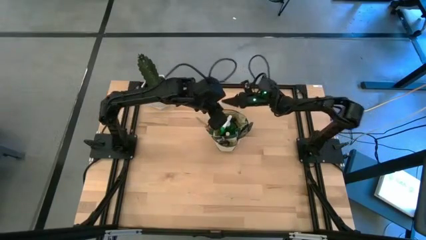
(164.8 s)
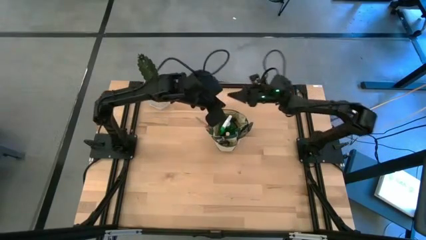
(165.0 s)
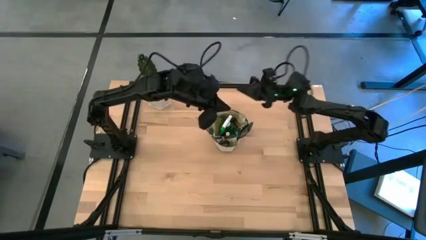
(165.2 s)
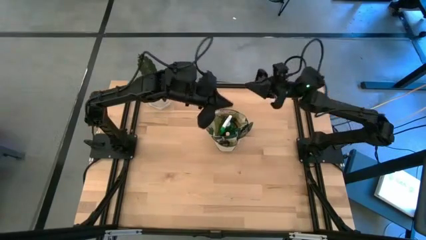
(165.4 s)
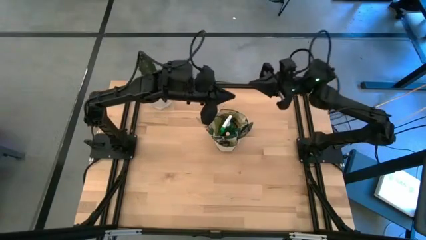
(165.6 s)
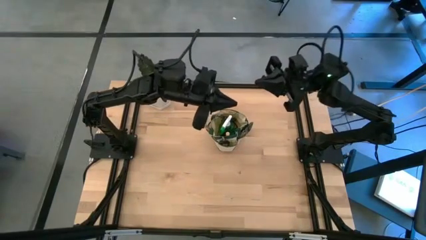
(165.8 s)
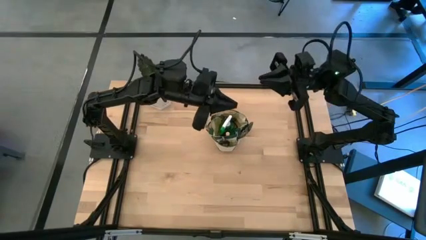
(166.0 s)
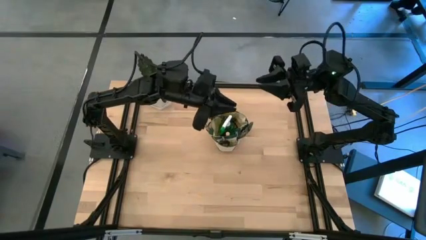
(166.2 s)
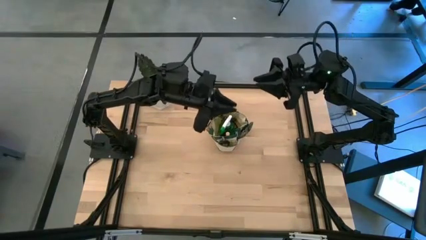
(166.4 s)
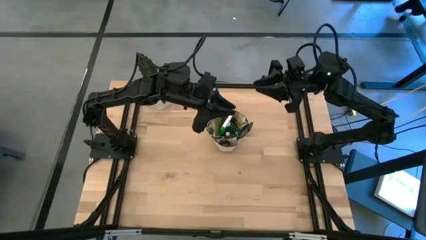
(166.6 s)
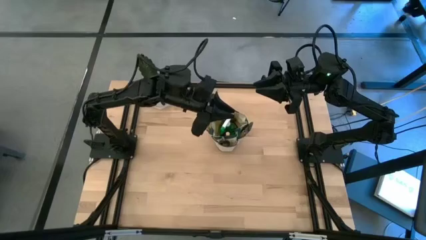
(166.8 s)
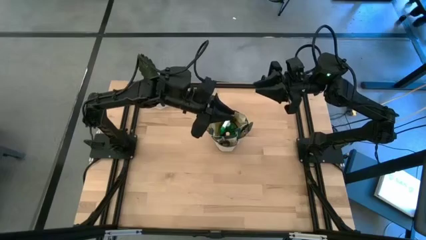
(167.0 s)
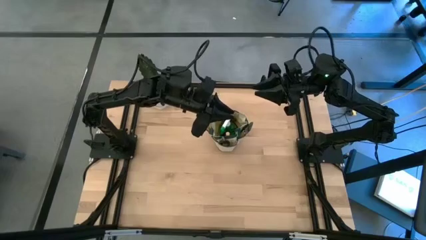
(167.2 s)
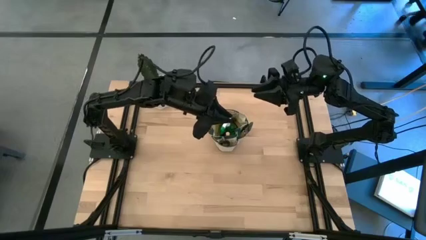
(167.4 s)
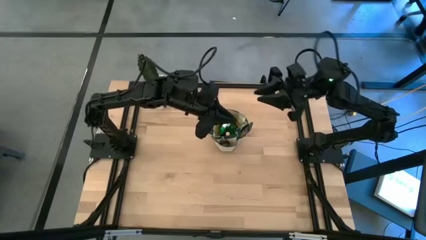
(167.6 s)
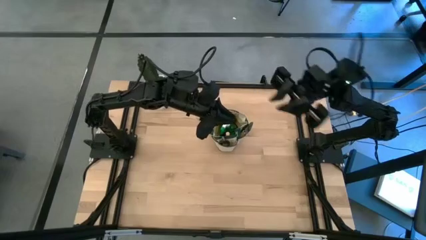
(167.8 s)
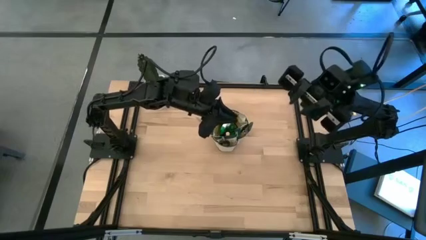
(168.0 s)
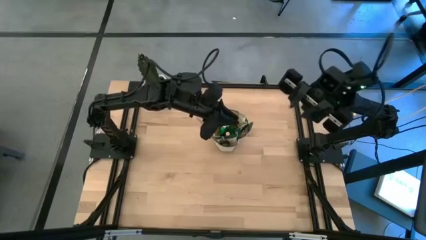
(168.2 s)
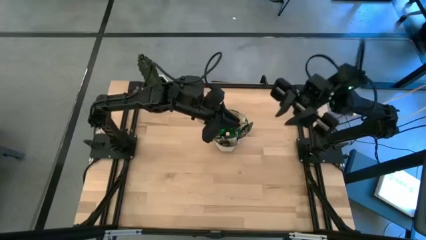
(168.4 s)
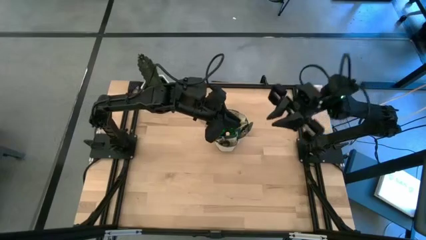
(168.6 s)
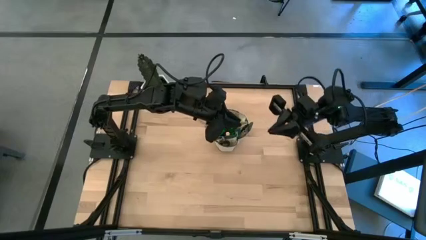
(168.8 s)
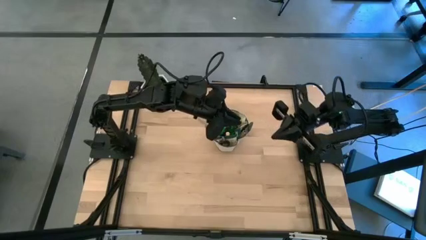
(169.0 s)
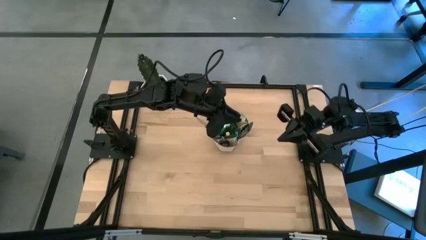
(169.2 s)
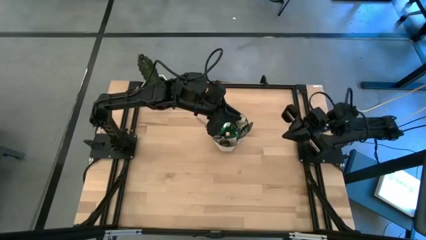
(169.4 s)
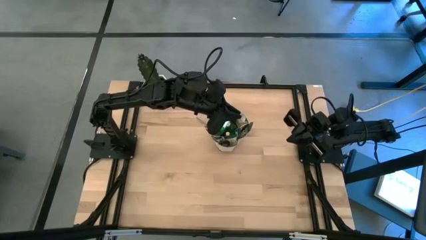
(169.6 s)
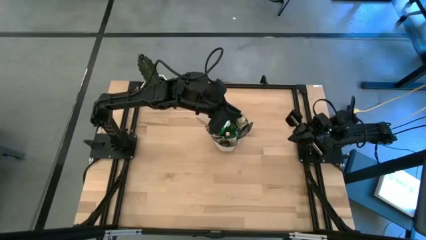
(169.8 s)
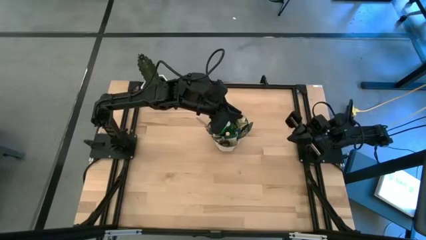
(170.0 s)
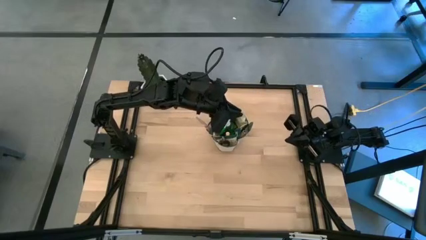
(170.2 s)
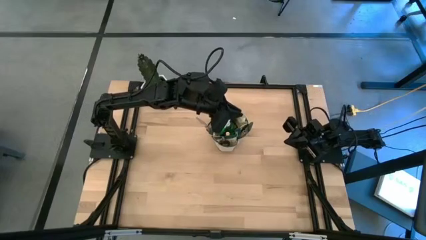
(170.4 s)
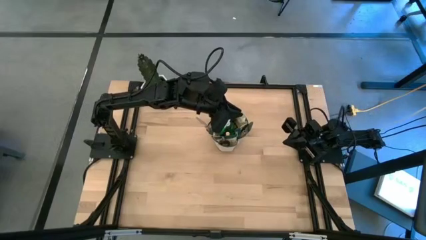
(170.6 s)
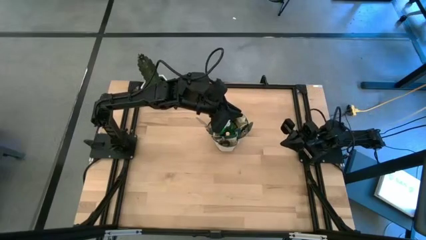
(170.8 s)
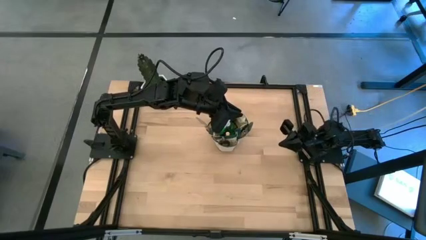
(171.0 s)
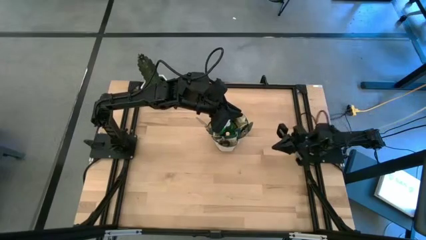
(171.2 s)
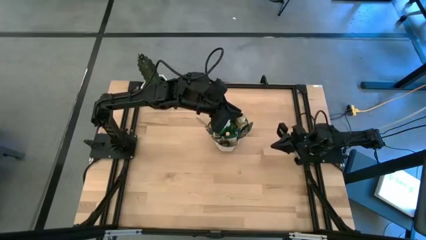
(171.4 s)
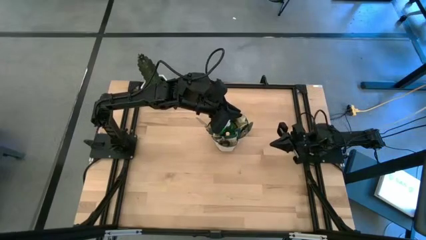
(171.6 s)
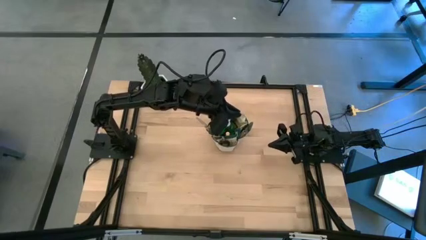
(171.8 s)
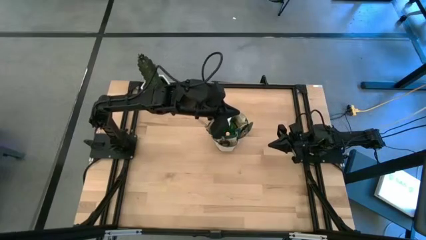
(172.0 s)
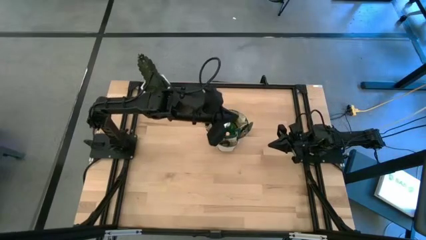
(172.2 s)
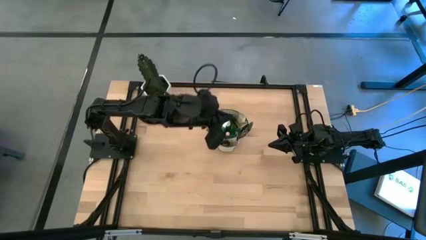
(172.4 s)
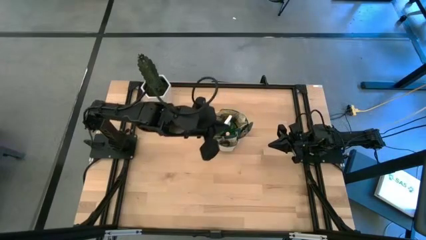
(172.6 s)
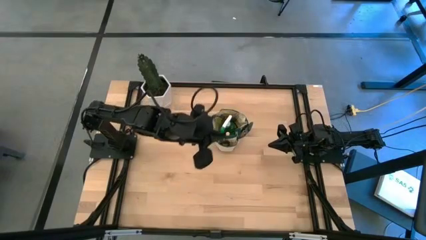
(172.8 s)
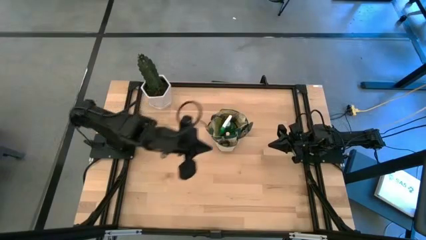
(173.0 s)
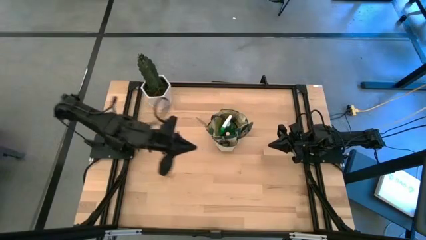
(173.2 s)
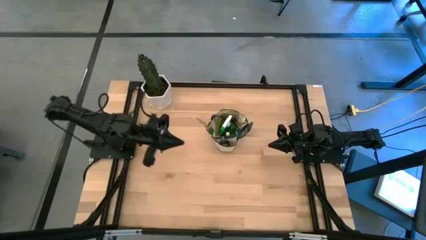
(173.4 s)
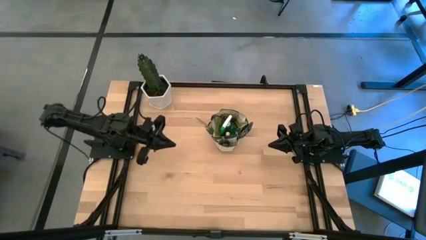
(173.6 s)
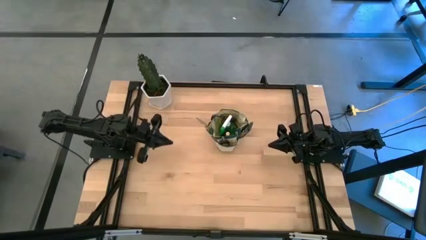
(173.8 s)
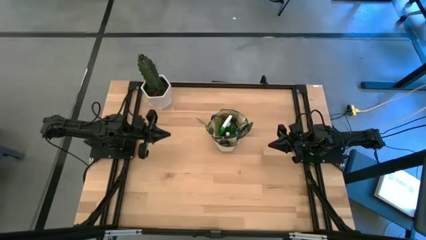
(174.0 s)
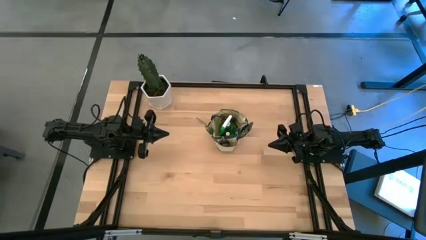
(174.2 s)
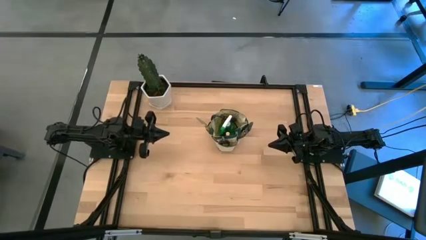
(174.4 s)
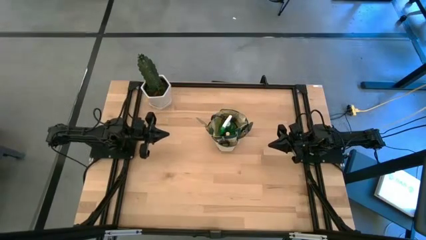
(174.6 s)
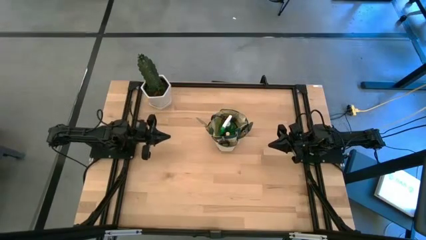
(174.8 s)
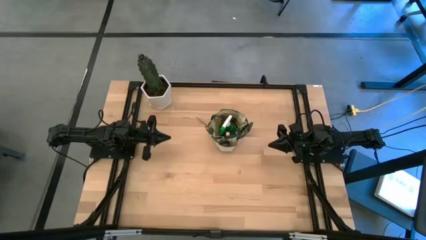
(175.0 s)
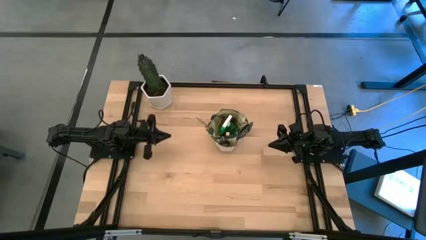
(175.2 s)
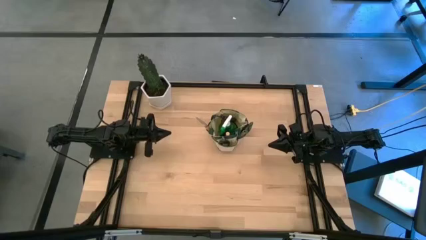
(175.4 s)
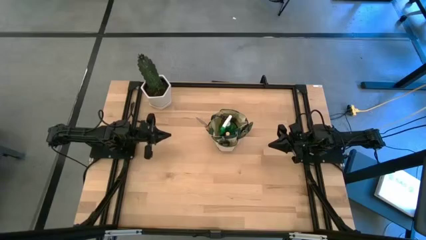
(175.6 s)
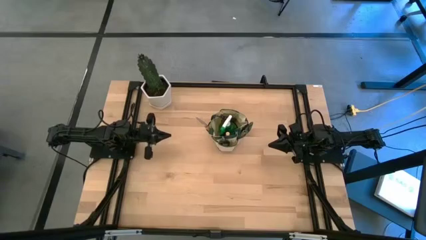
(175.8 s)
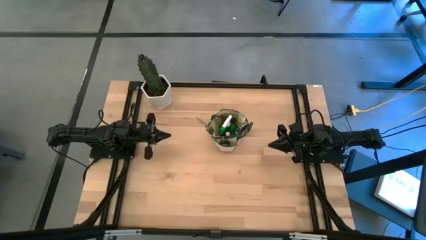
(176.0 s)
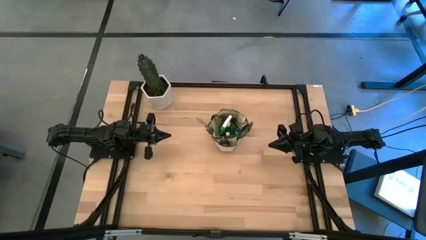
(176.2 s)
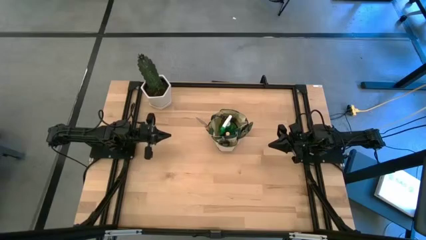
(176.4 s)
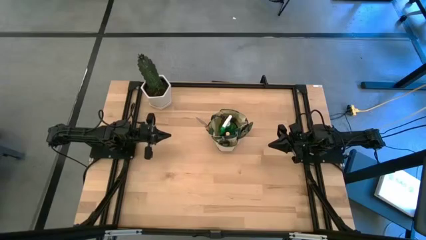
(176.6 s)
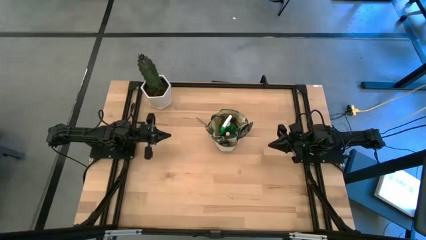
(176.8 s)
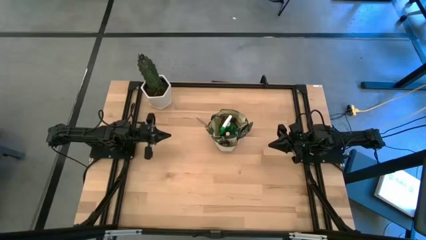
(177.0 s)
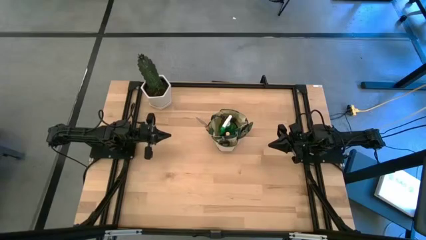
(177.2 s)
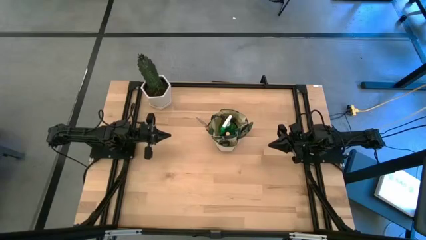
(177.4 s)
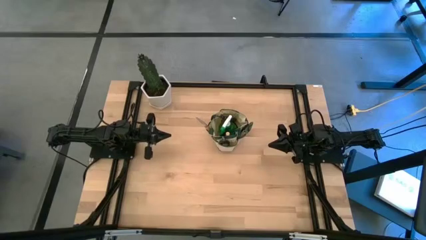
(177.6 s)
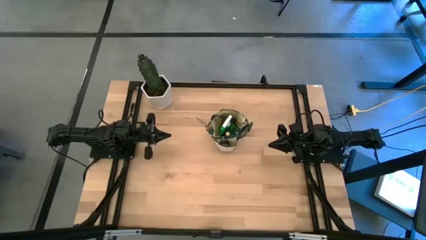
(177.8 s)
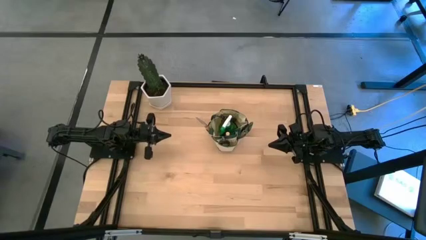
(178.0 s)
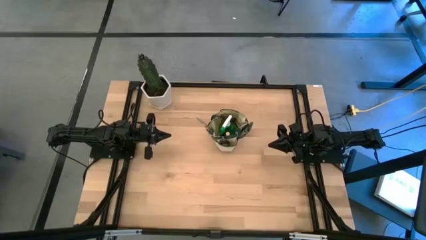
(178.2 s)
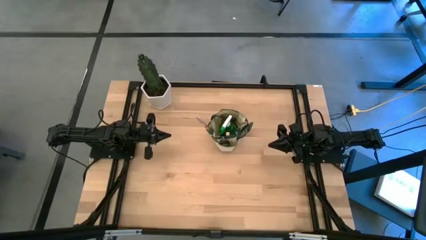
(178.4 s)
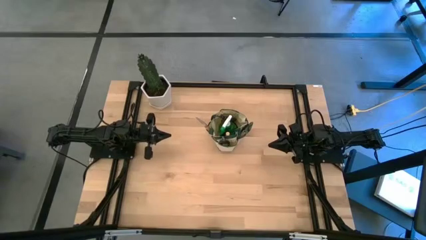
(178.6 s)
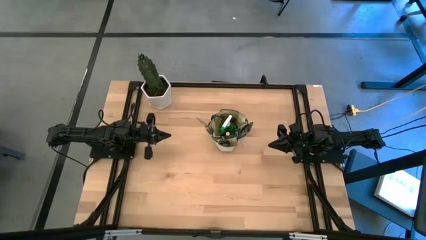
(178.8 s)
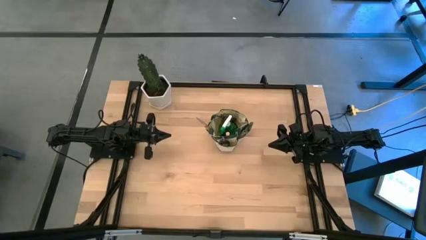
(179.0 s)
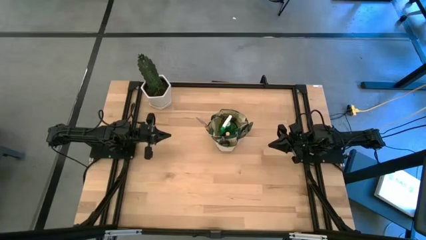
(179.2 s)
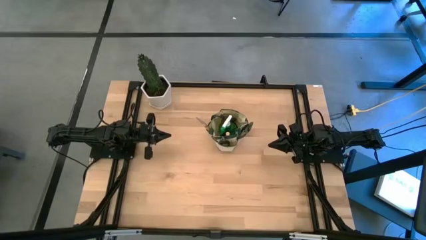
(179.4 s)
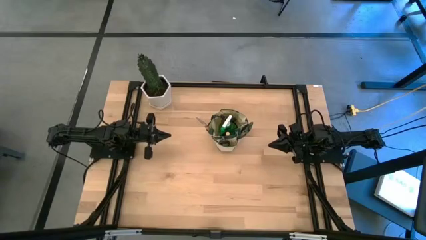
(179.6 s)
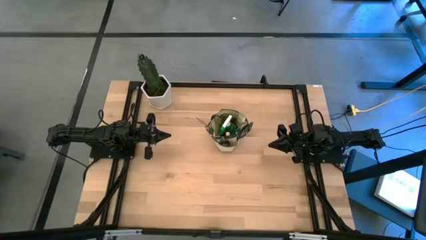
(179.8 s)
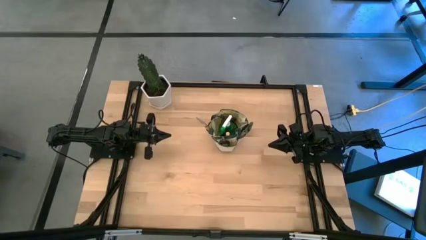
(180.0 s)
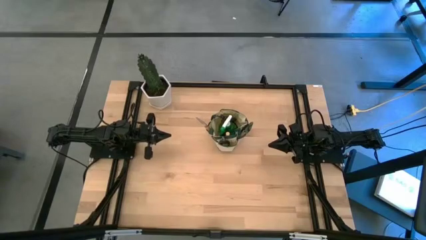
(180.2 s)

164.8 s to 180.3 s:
Task: Pick & Place Garden tools in Gardening bag
Return to Home Position

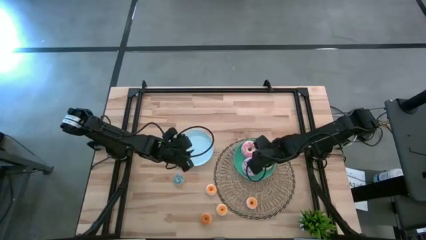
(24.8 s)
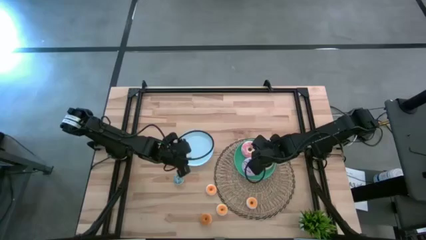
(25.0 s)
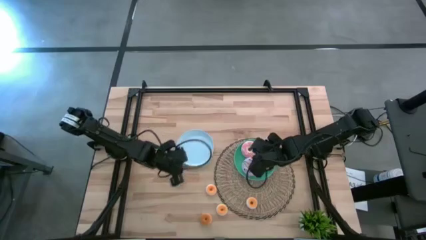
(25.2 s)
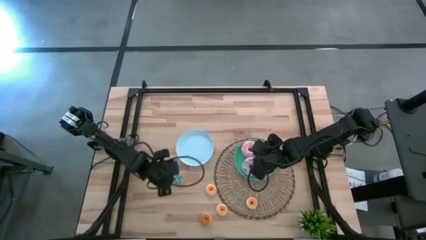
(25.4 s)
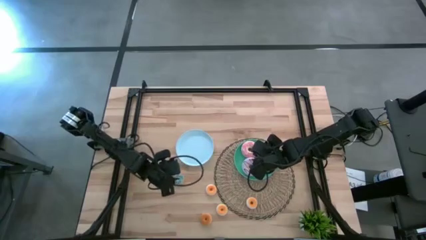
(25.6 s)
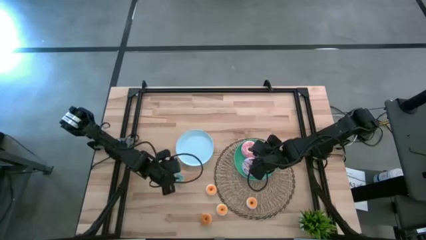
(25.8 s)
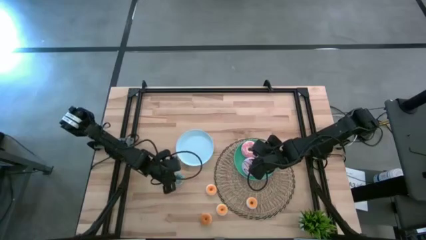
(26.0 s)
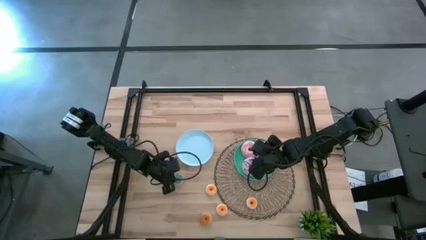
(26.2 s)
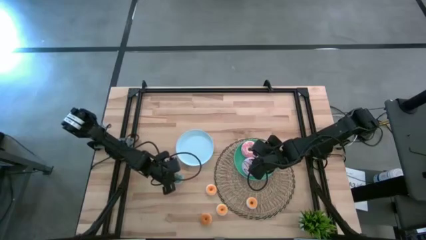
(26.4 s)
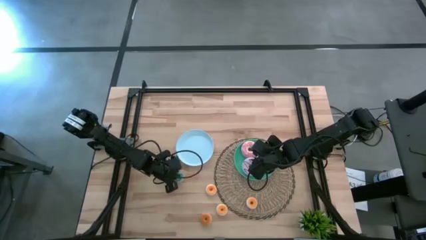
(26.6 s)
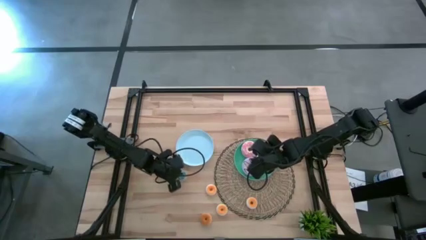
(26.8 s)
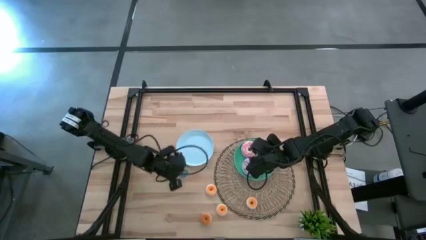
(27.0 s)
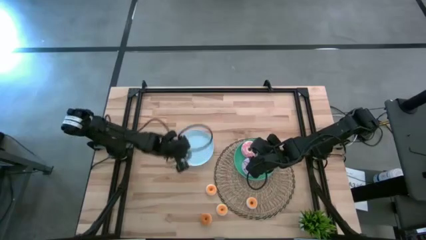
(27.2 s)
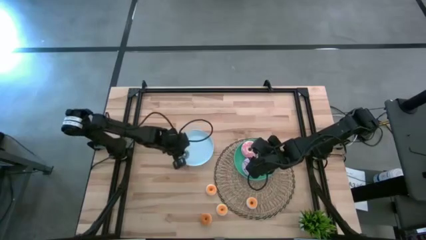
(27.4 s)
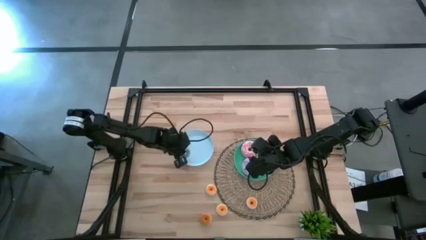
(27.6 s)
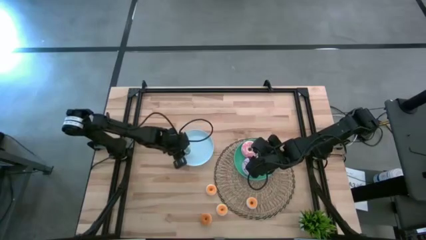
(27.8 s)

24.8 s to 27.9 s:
Task: Pick & Place donuts
Put the small blue donut onto the blue plate
